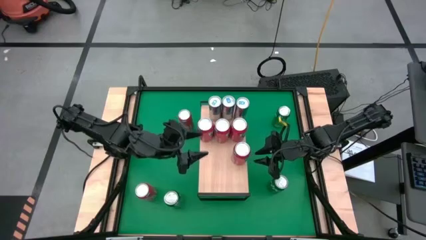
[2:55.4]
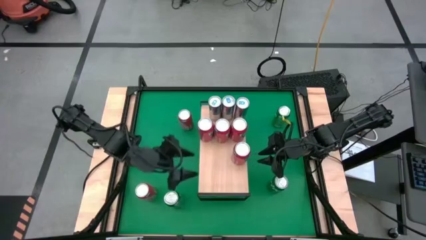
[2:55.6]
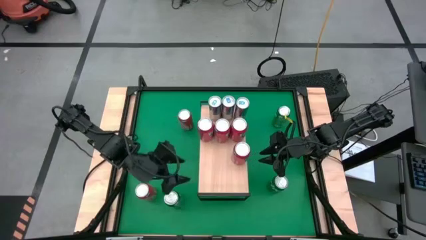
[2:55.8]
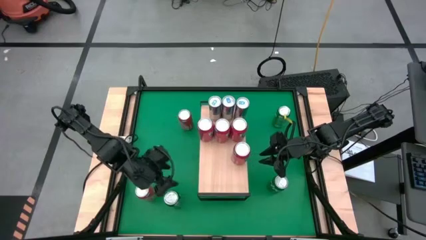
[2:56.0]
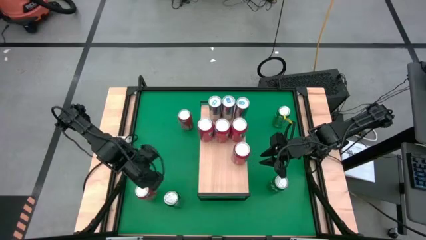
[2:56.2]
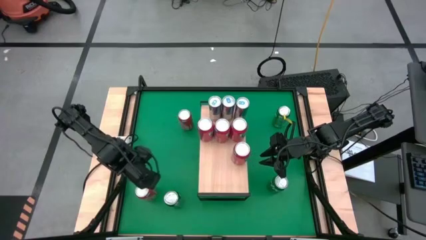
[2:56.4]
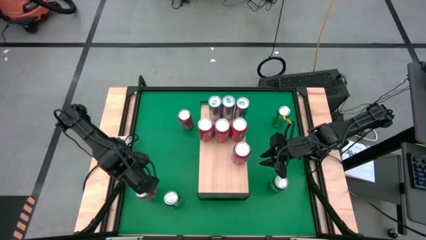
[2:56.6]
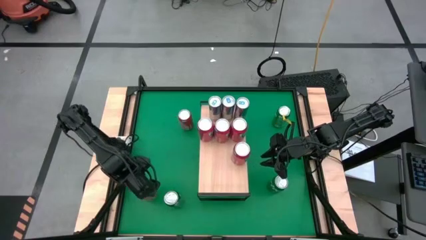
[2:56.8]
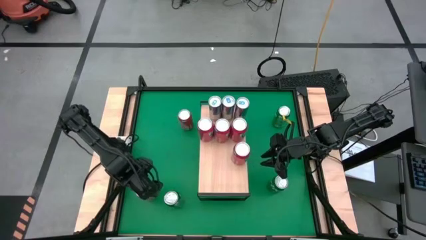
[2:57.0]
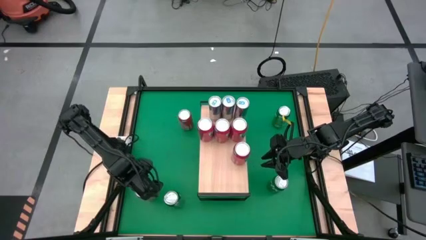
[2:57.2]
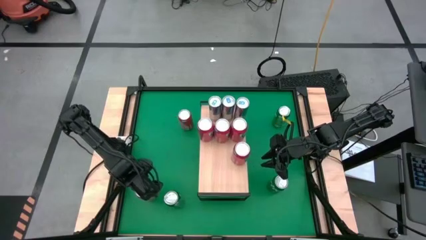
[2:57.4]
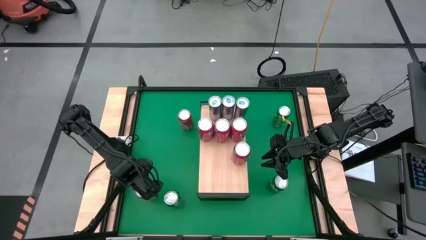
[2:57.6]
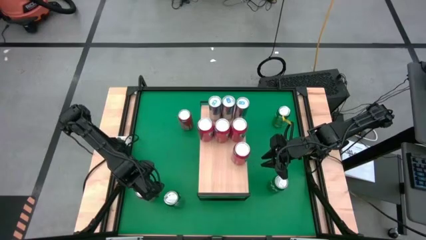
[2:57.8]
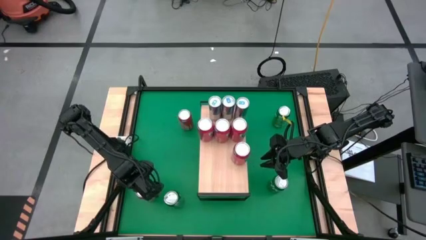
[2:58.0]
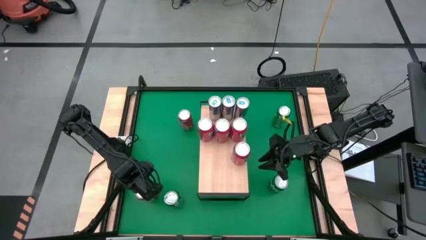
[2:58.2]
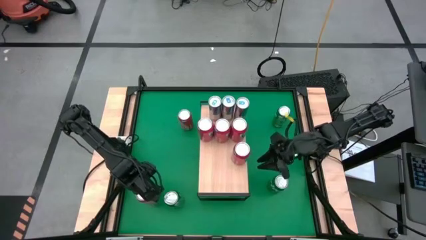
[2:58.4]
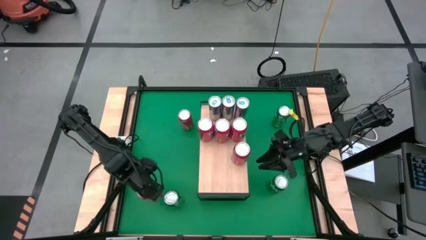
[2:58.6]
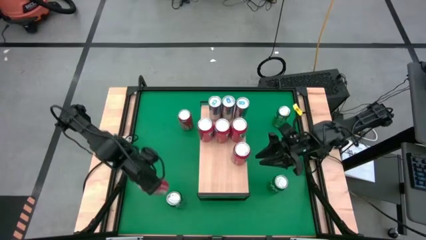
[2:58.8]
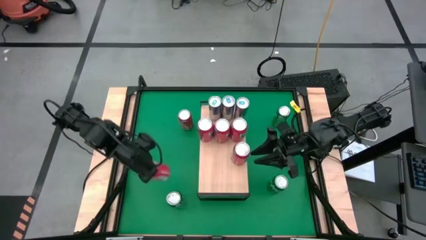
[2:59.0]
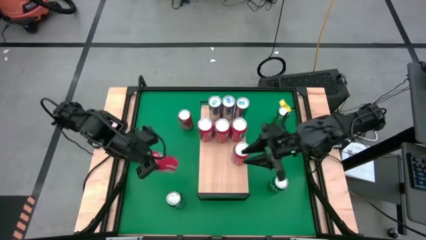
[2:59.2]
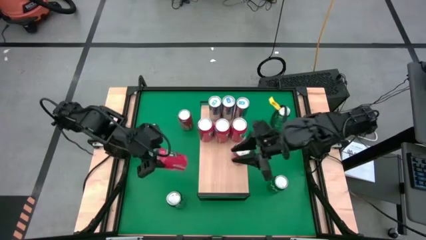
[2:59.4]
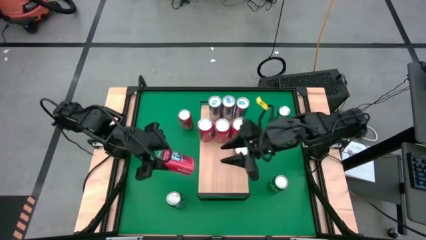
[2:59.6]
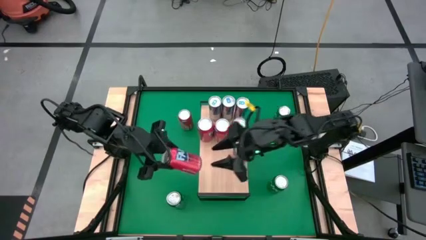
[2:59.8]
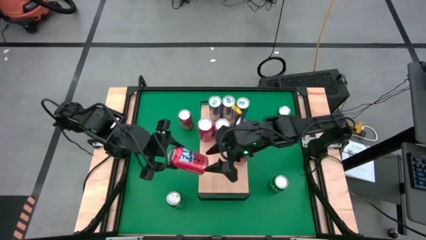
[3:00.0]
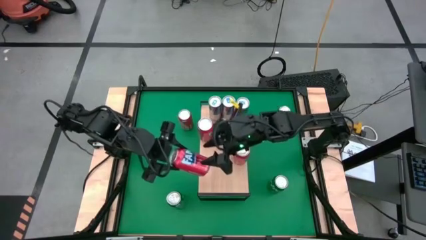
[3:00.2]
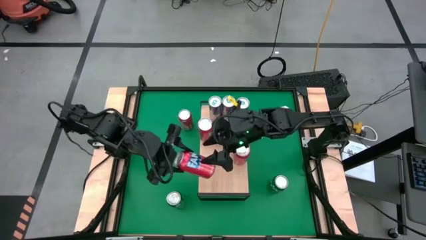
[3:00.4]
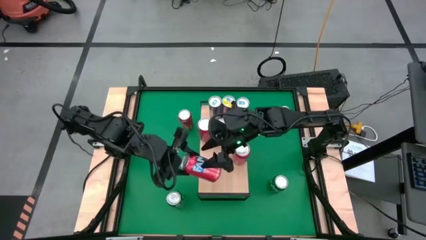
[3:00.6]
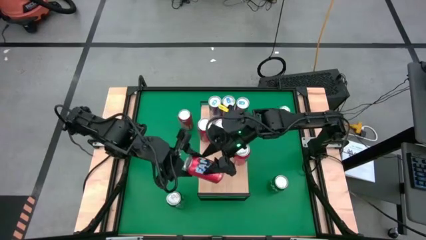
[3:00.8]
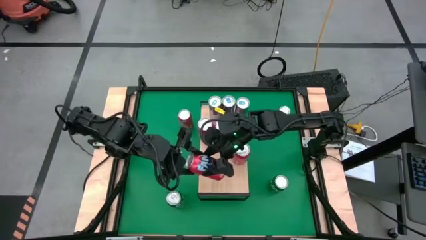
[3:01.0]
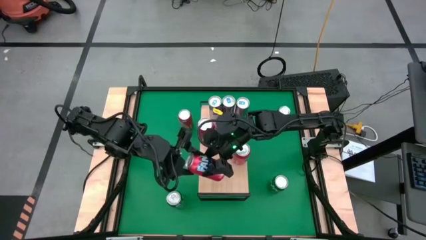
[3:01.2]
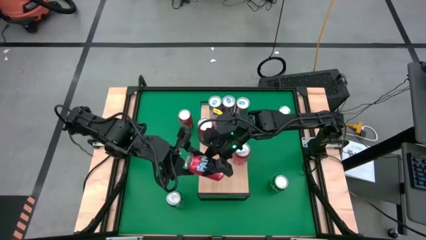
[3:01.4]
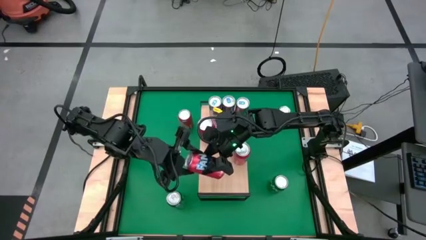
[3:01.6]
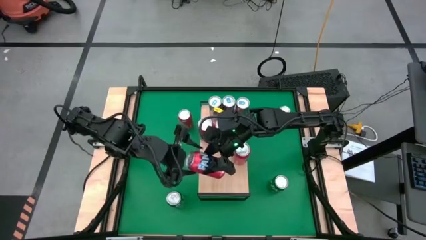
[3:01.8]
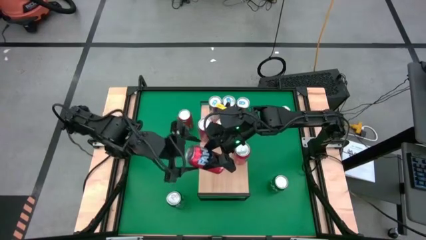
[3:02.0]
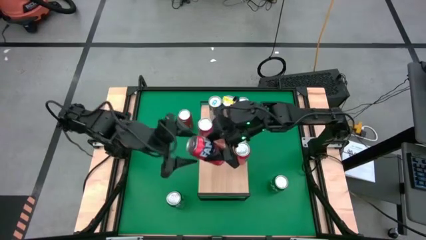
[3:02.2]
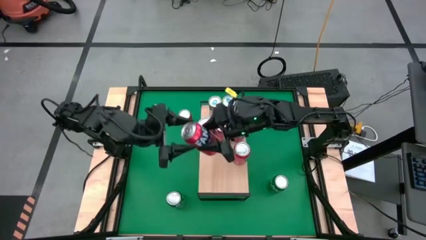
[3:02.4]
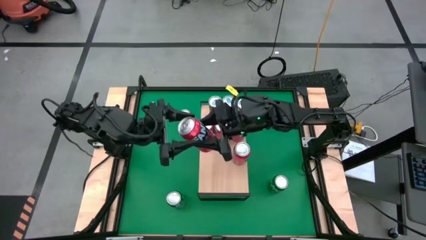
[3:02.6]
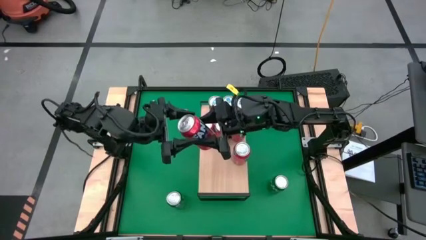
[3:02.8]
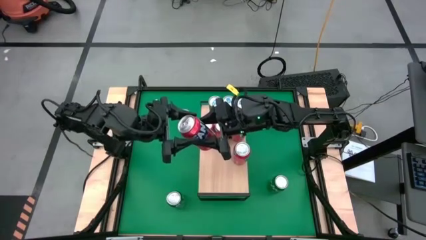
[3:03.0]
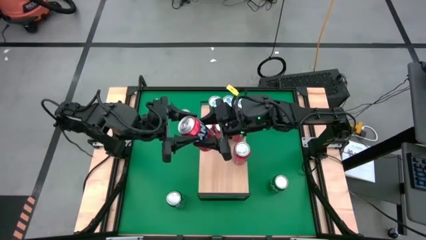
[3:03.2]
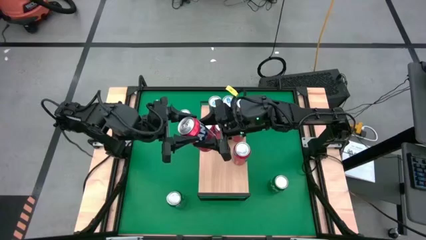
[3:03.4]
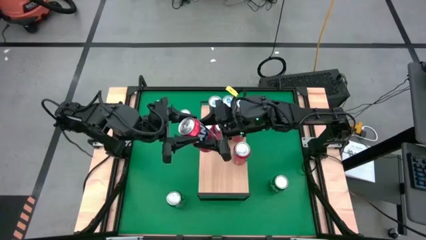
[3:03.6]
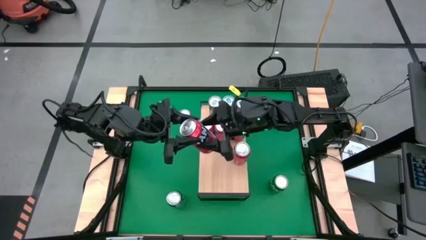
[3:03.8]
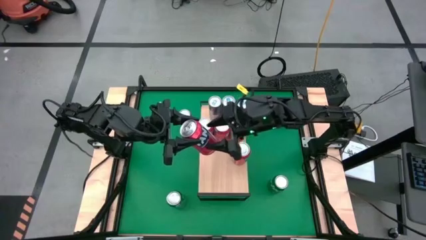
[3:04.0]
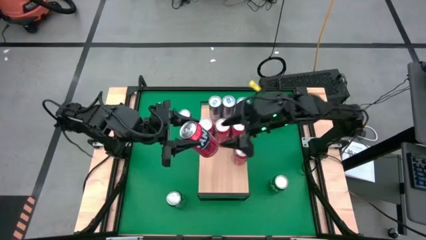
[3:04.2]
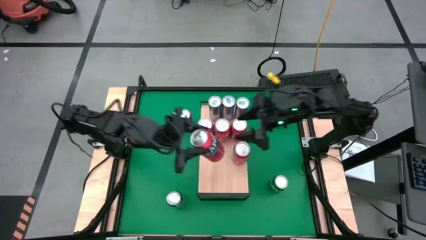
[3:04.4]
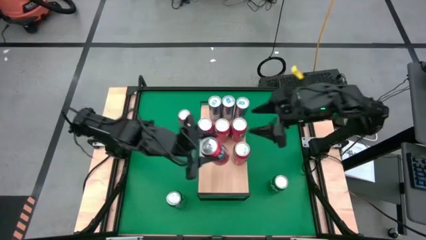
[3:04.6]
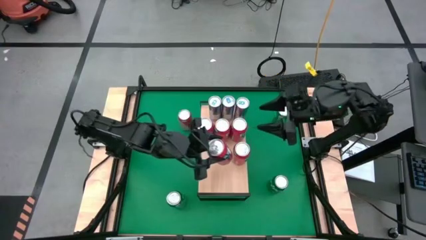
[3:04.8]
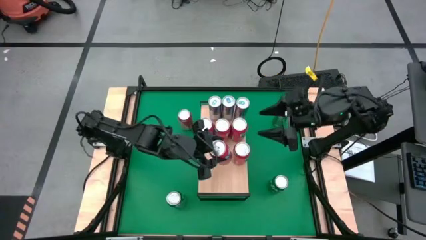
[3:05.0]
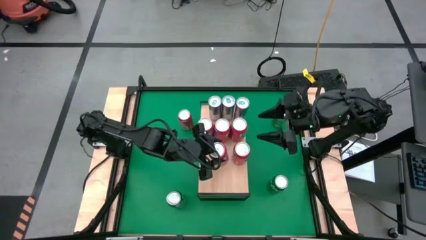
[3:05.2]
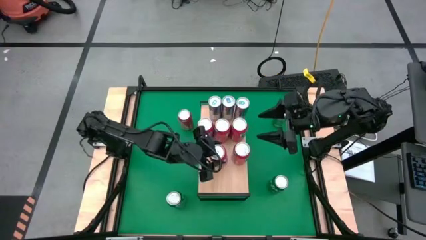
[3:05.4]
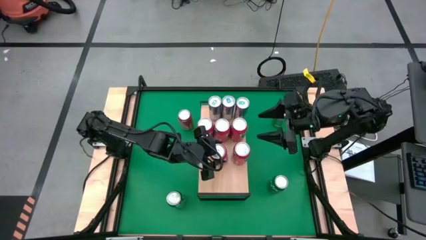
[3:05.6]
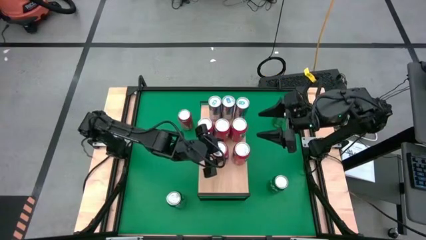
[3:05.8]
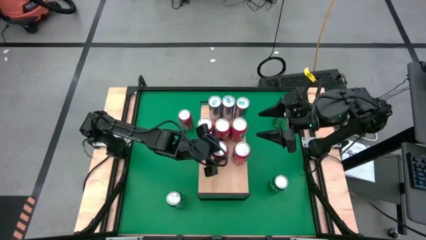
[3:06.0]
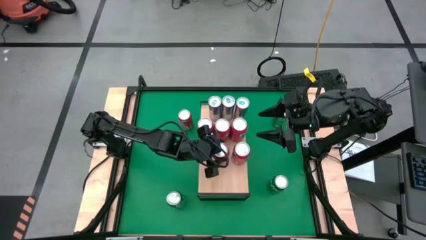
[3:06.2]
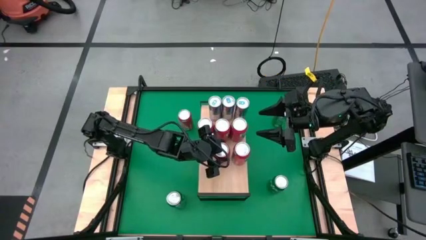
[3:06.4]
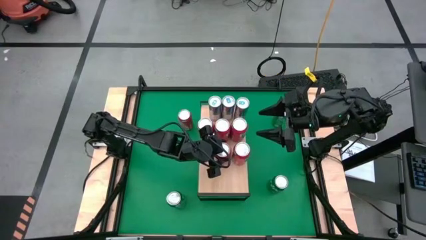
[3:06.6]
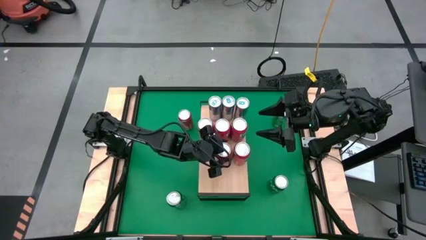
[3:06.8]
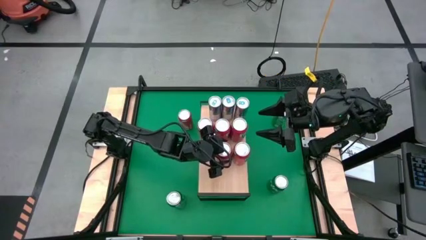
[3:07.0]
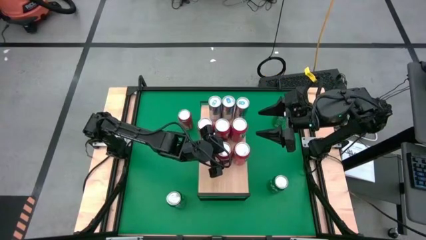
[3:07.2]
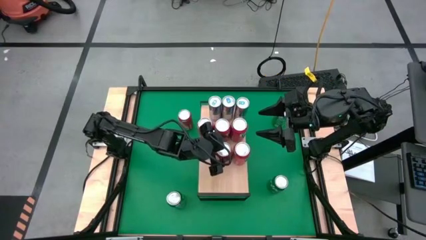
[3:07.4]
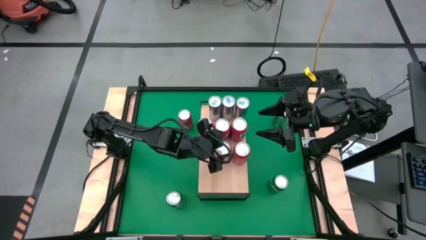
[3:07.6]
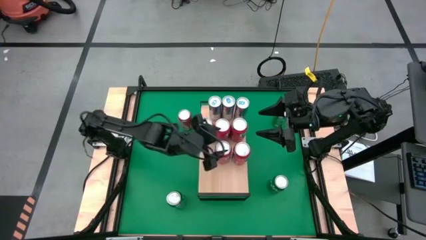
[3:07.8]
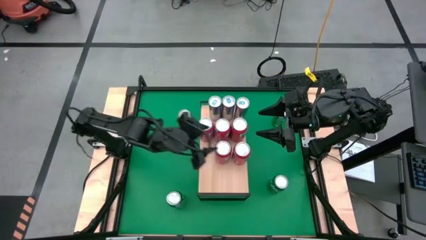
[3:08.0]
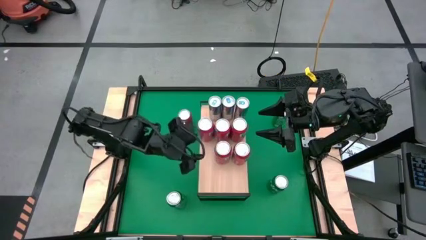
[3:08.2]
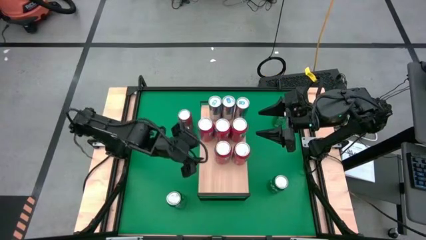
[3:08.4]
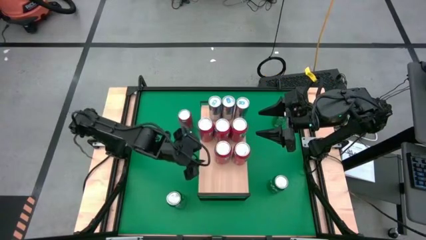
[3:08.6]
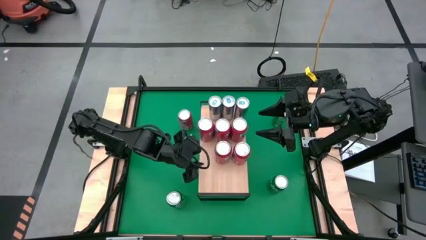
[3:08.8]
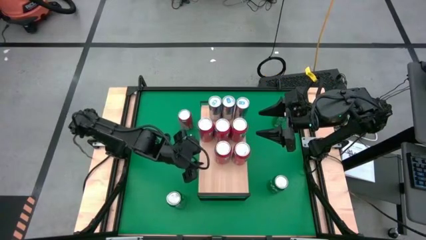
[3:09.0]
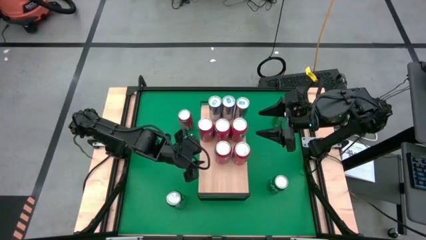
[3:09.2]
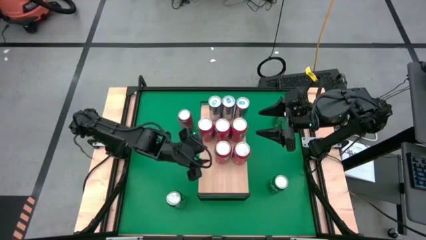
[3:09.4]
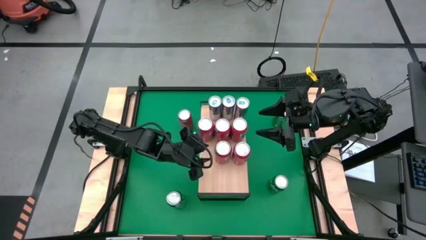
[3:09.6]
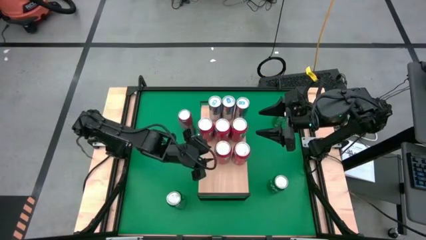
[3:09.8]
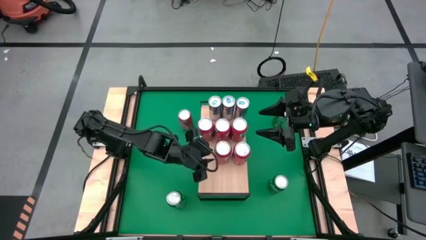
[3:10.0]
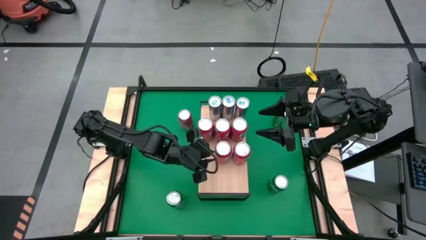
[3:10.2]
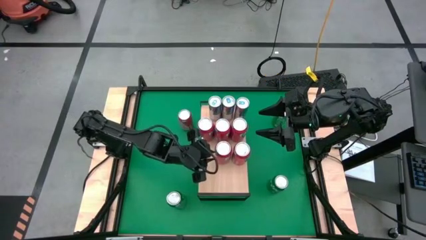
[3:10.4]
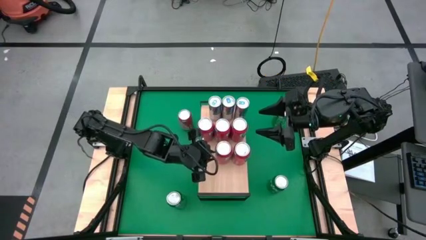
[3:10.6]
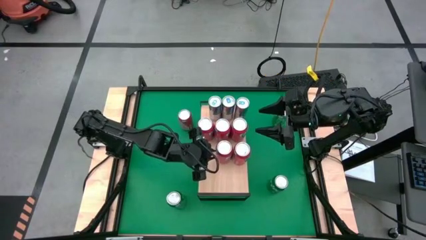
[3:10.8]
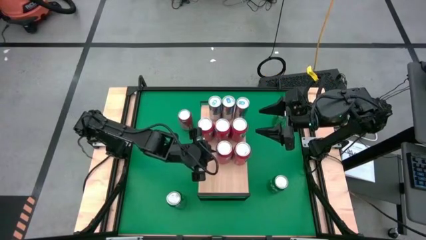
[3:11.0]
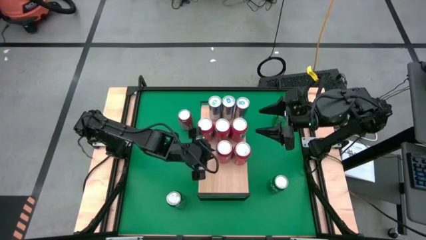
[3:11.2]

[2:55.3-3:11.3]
Task: Place canned beverage on shelf
Put the orange soda can on the shelf aligned with the other orange soda can

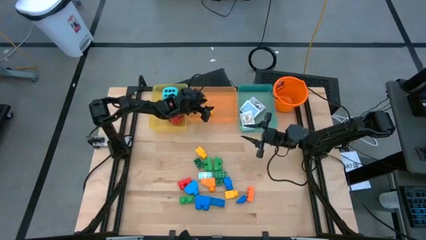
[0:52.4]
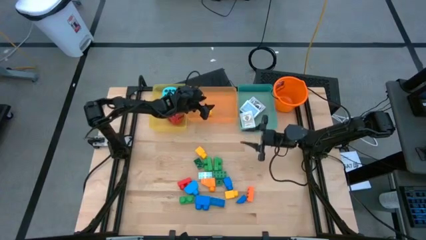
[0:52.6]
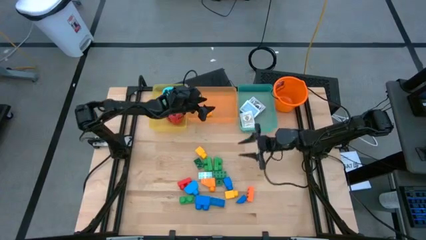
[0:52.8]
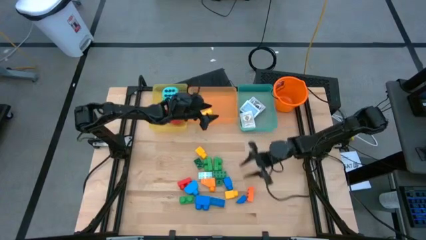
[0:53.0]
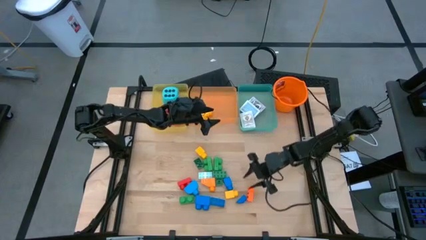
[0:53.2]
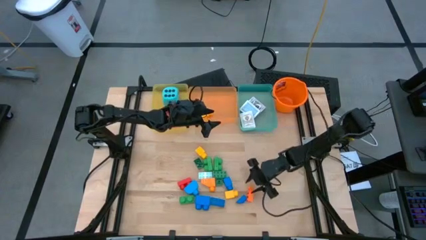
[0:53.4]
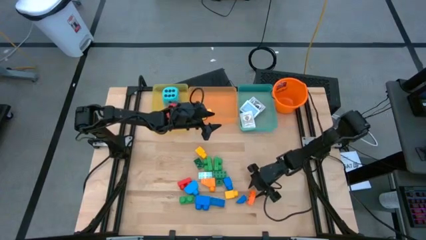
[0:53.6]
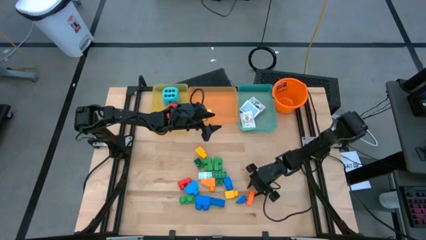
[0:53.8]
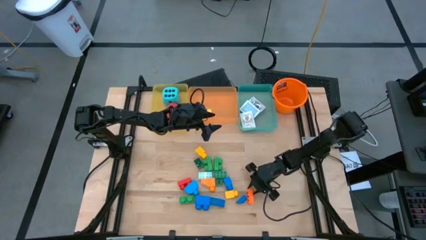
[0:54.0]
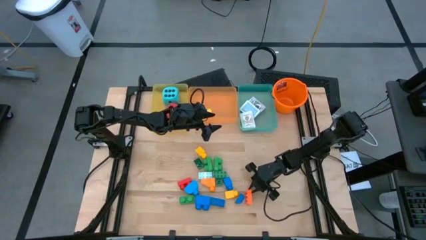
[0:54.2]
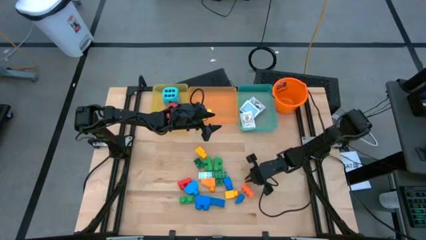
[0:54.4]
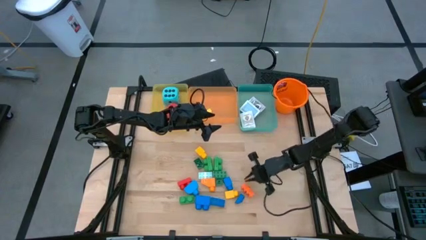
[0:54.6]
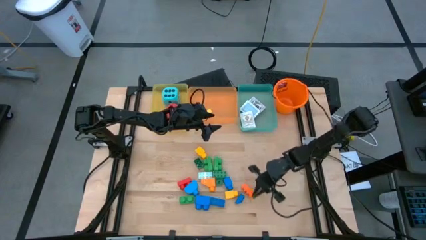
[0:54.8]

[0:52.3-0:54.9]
Task: Pick & Place Toys
Put the orange game piece into the orange bin
